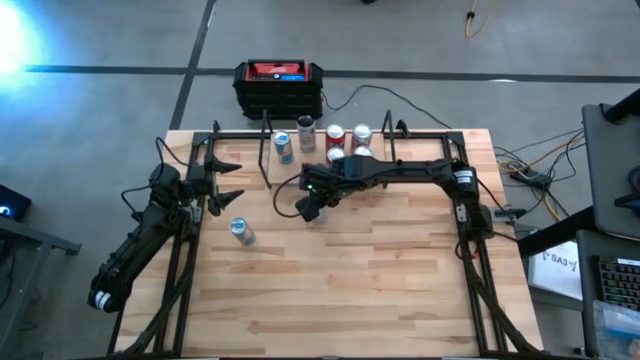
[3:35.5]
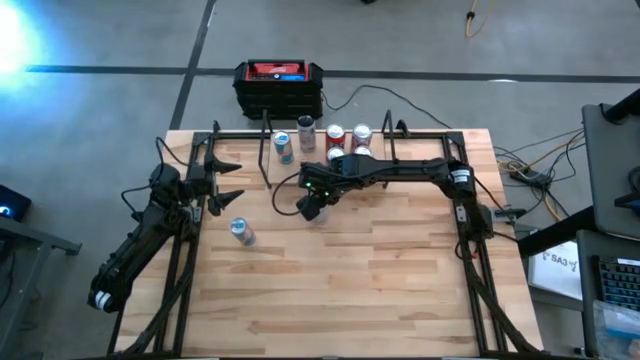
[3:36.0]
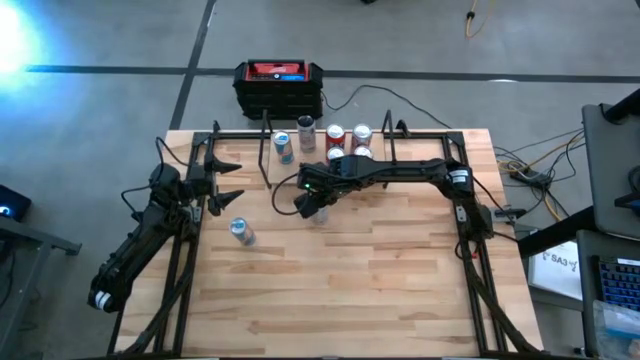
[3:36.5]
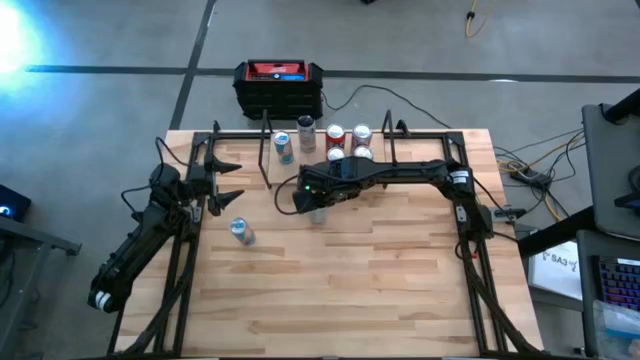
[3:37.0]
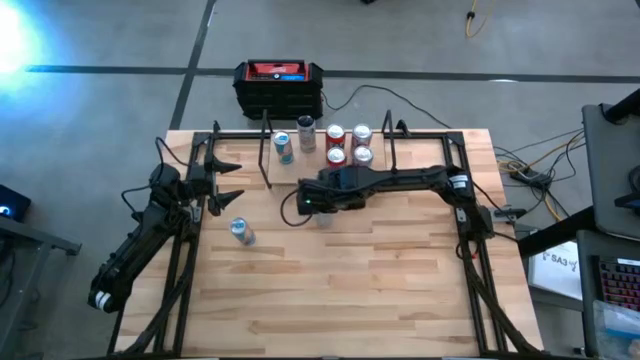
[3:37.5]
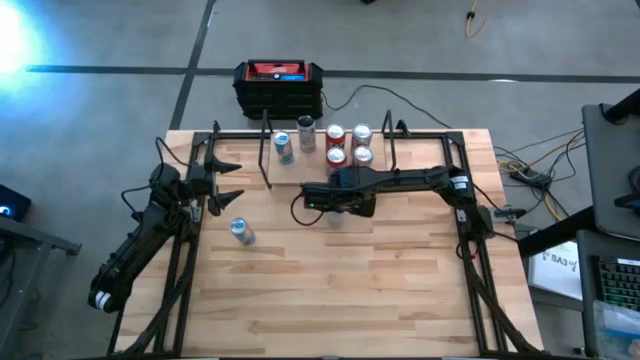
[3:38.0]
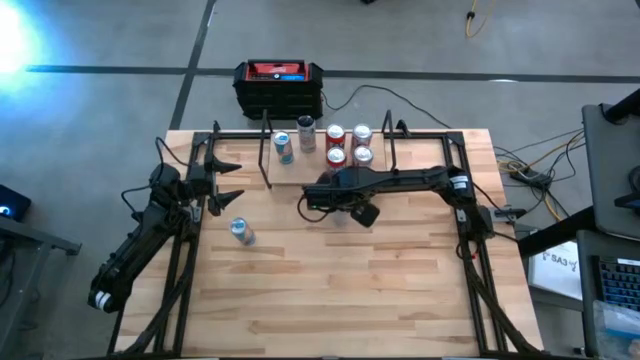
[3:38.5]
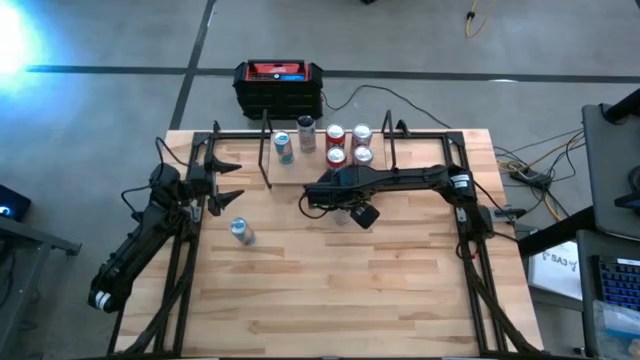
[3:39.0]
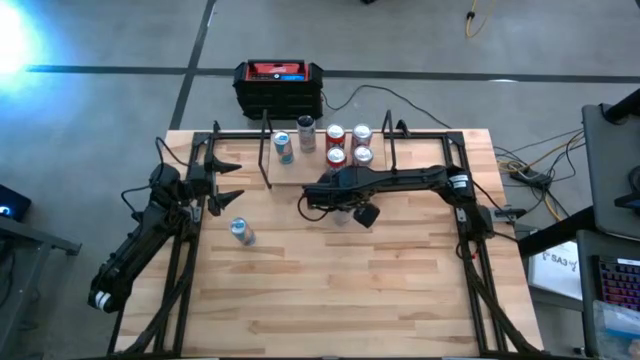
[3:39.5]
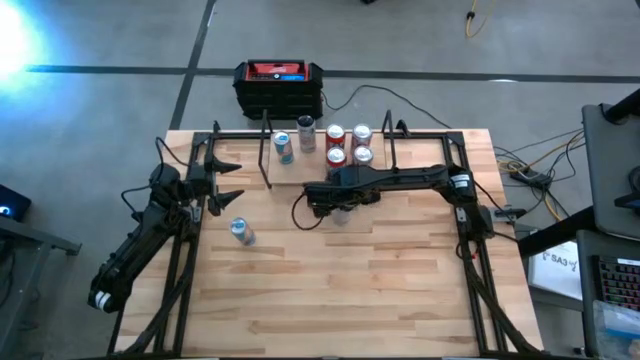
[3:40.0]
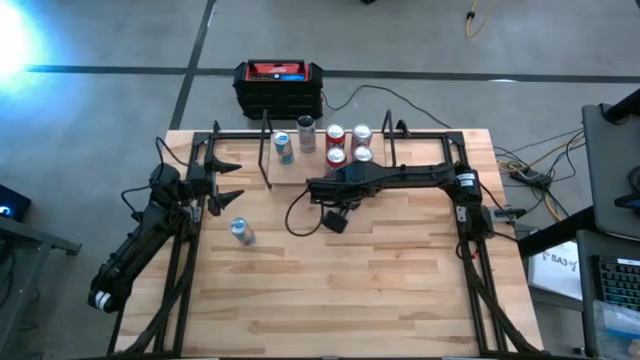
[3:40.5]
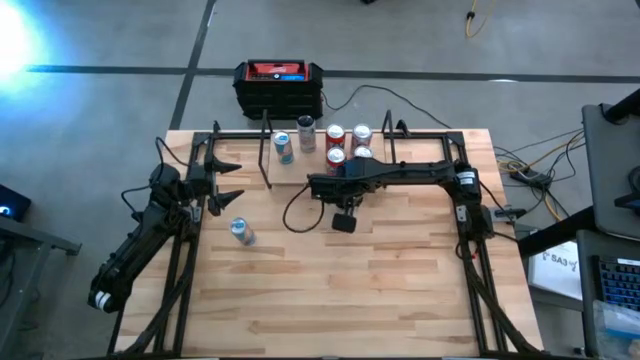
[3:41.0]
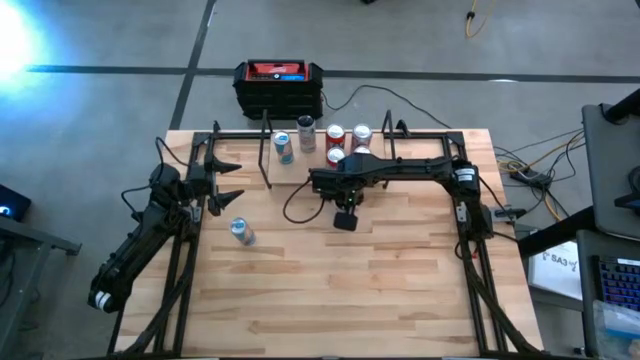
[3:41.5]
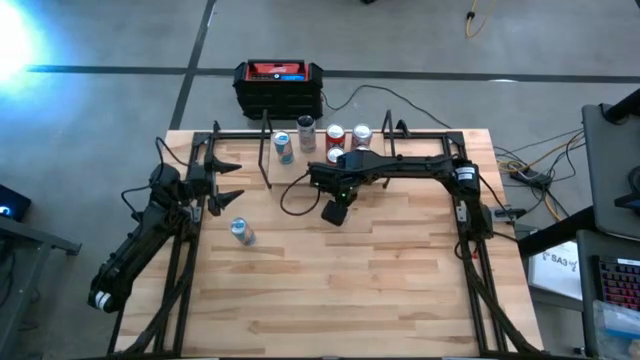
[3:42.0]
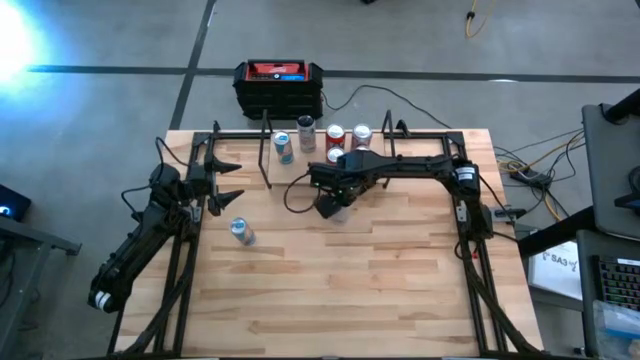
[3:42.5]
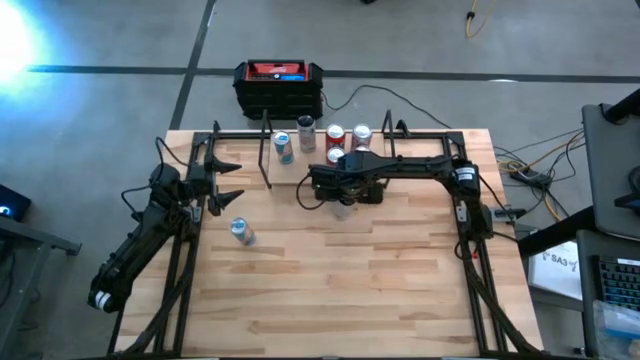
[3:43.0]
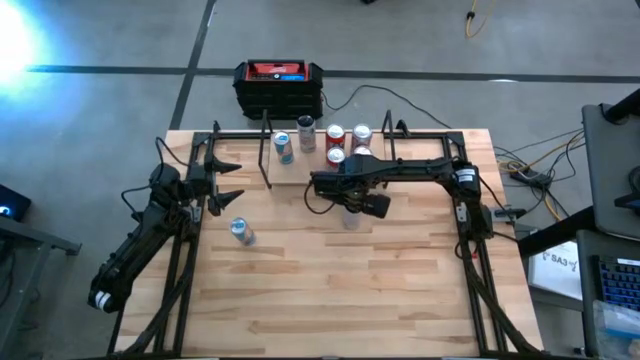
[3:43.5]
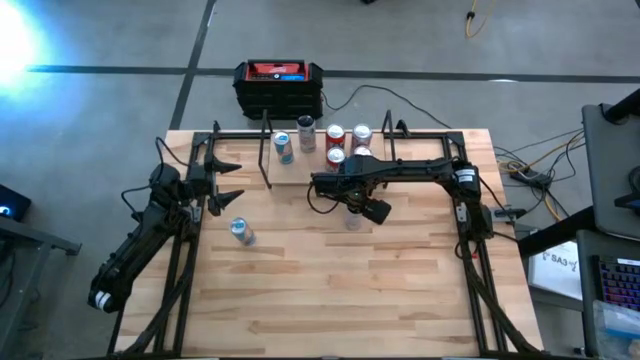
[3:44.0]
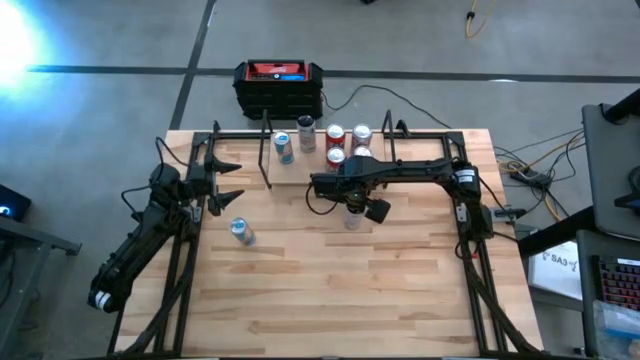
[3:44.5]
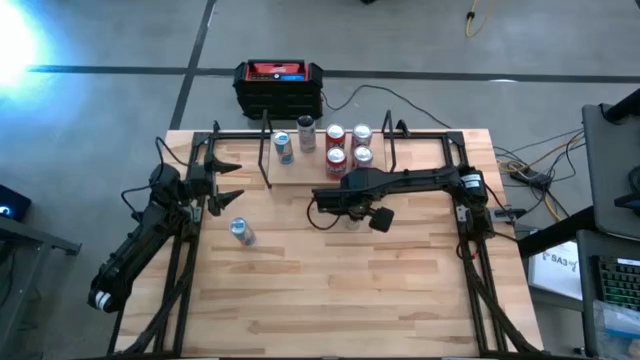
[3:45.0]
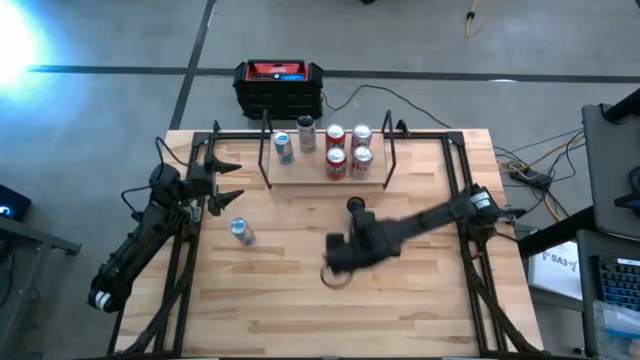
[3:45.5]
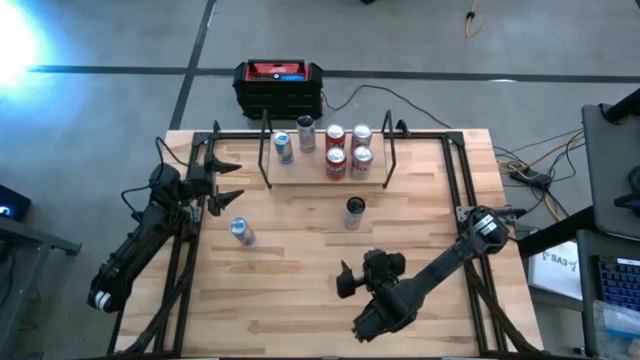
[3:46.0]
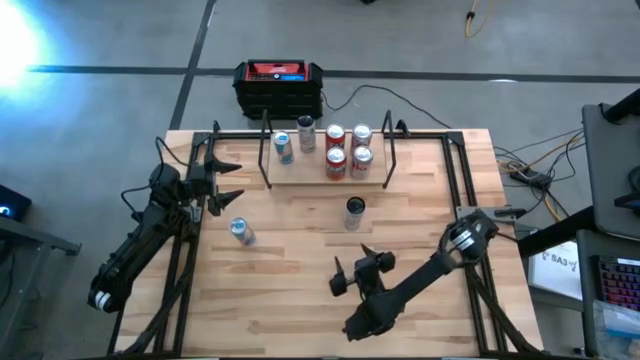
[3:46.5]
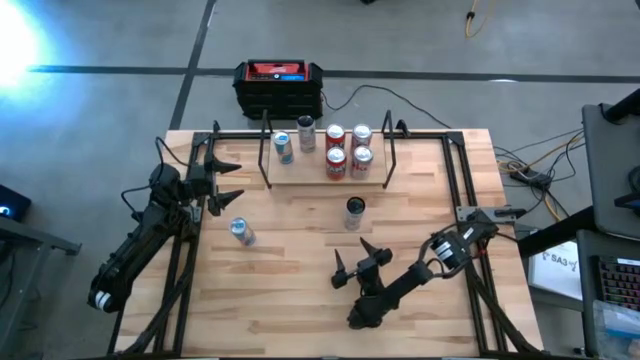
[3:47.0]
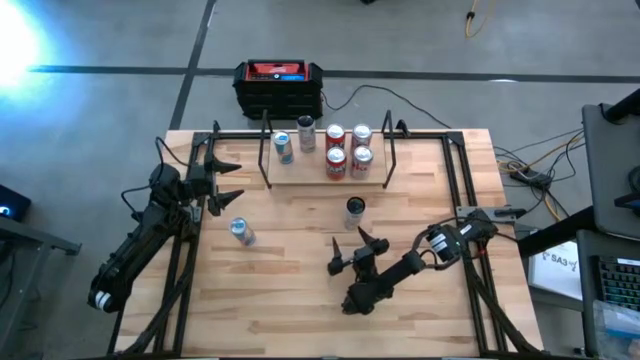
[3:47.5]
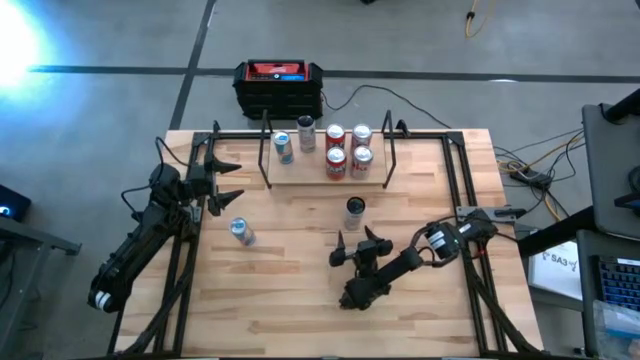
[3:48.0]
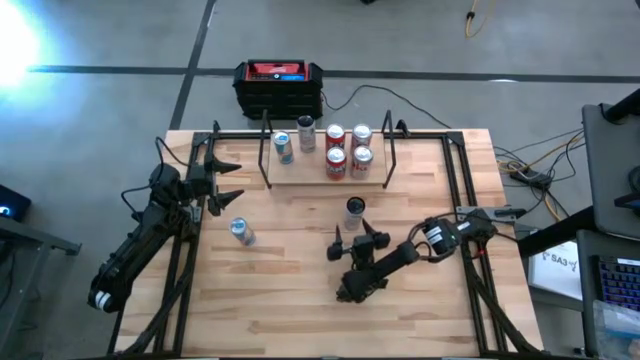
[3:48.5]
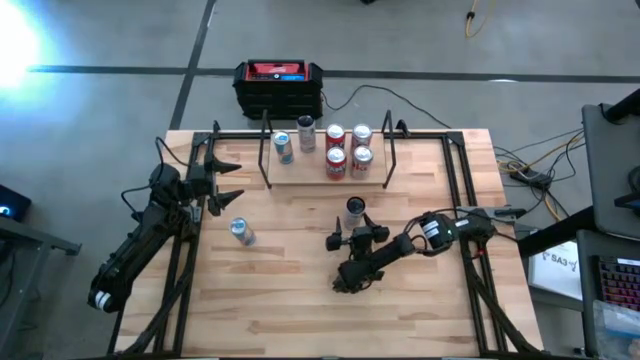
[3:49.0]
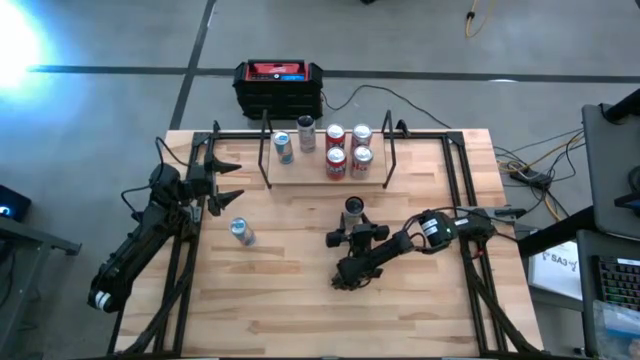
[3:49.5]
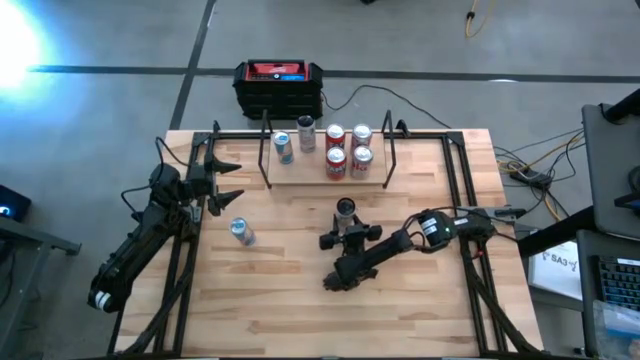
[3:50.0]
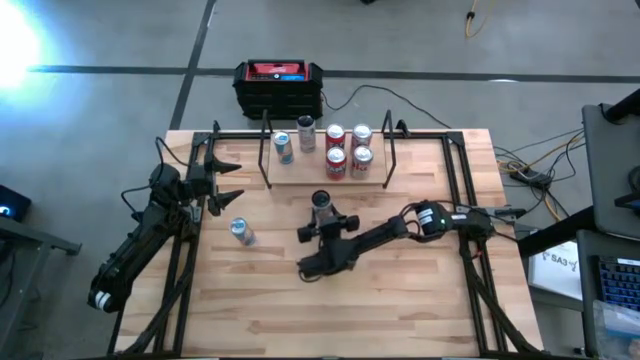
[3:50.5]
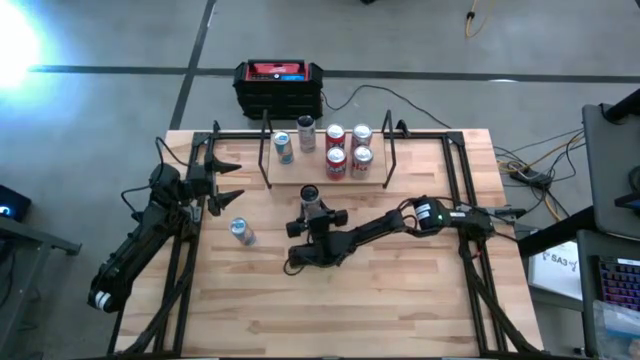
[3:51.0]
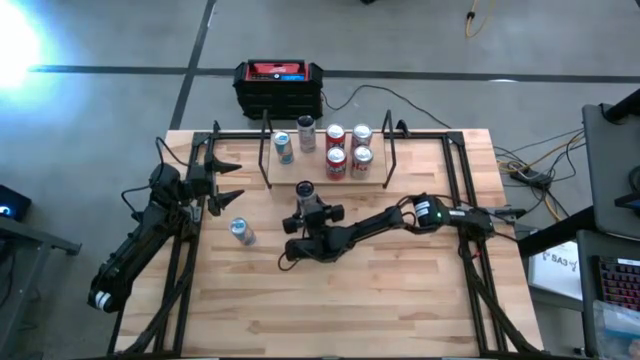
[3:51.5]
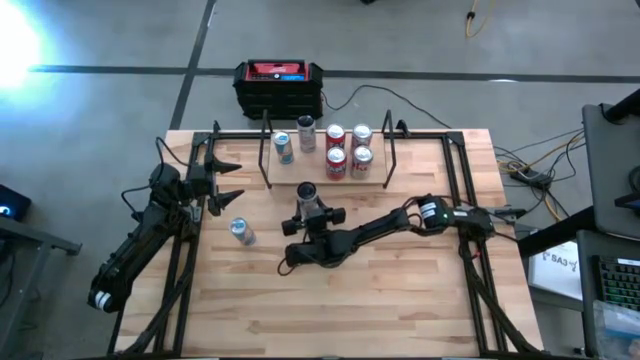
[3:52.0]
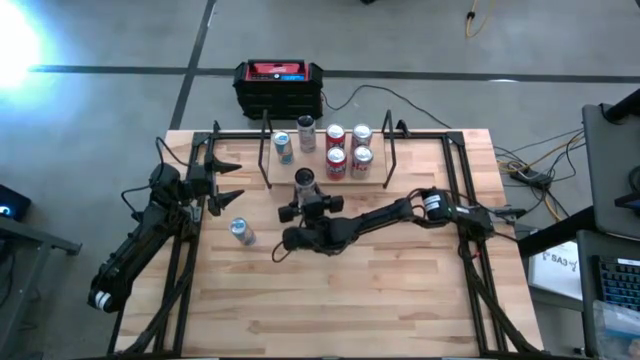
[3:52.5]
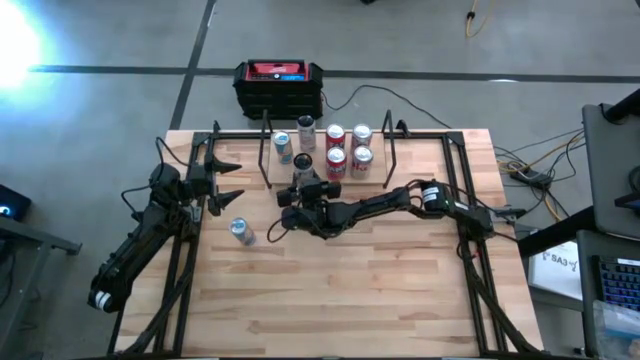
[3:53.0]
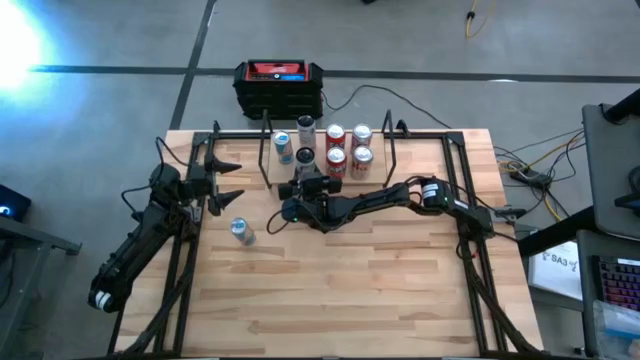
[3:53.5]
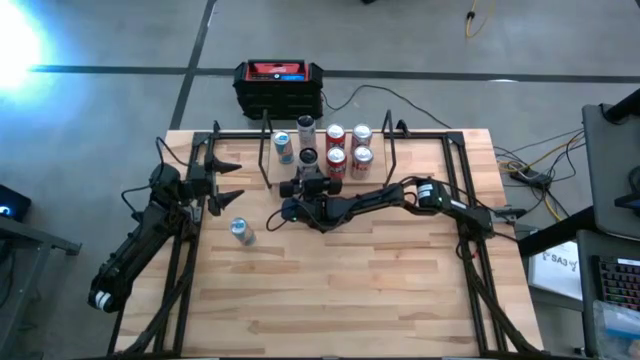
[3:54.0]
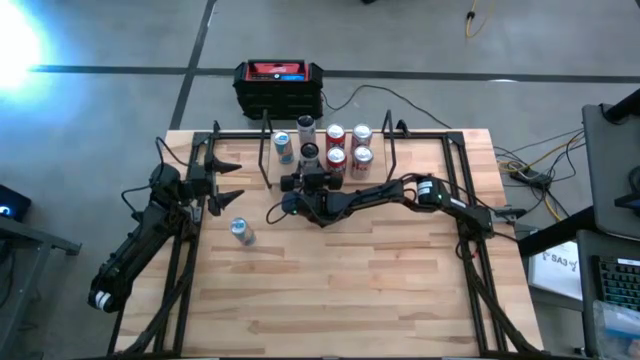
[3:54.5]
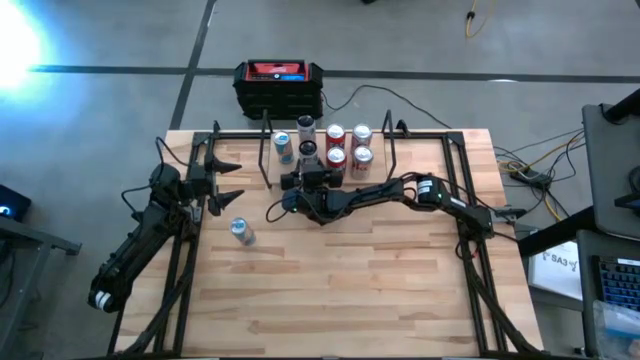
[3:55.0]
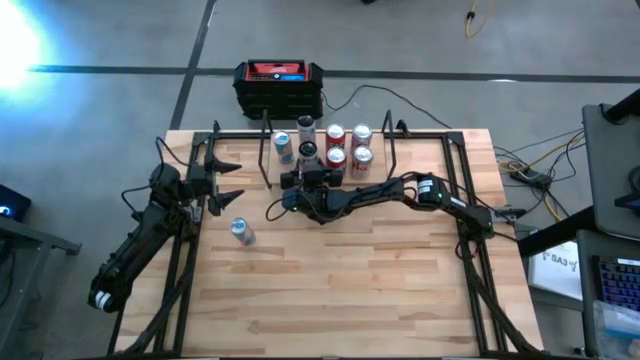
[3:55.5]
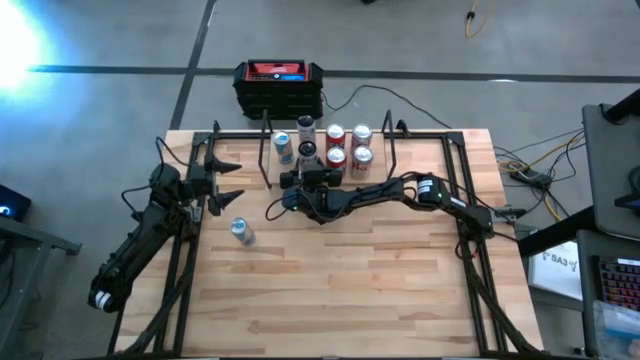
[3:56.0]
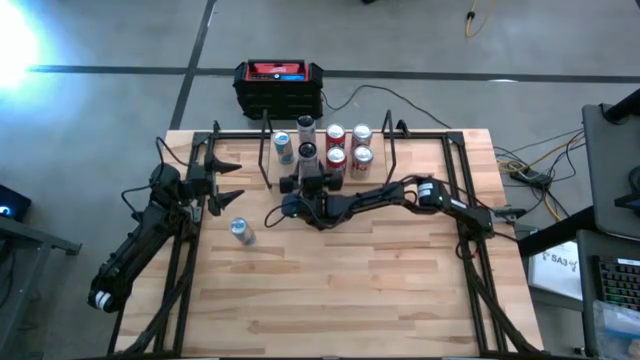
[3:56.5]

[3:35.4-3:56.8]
Task: Place canned beverage on shelf
Put the white and pink soda can on the shelf aligned with the other white and pink soda can
